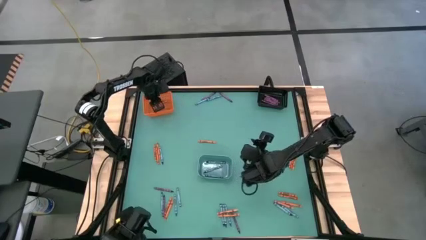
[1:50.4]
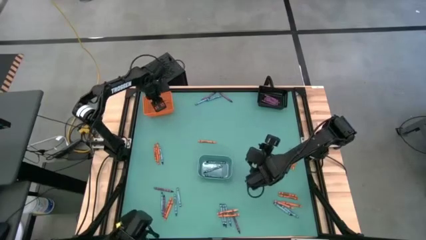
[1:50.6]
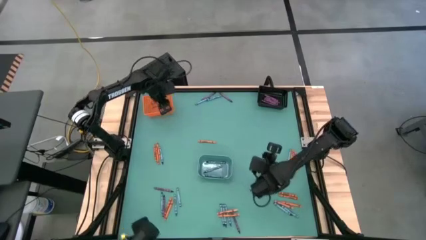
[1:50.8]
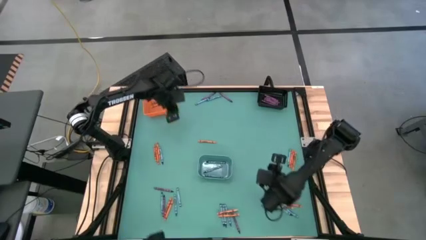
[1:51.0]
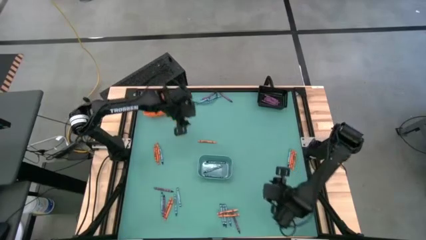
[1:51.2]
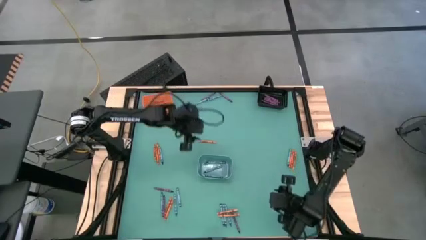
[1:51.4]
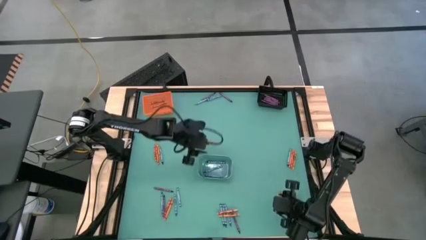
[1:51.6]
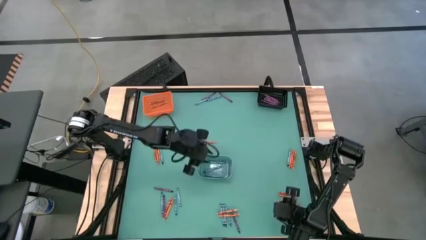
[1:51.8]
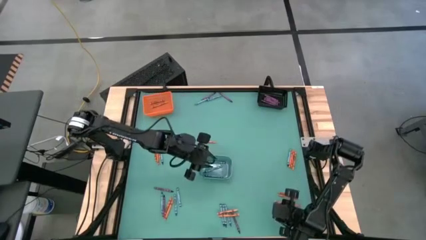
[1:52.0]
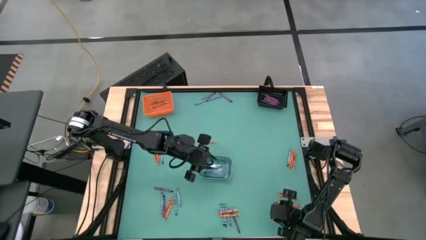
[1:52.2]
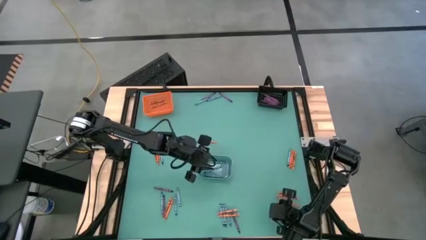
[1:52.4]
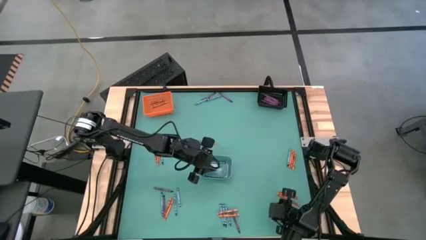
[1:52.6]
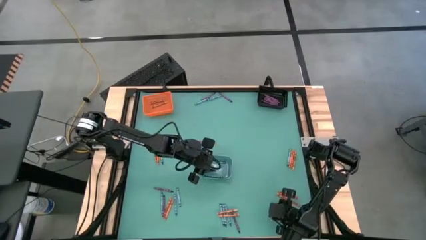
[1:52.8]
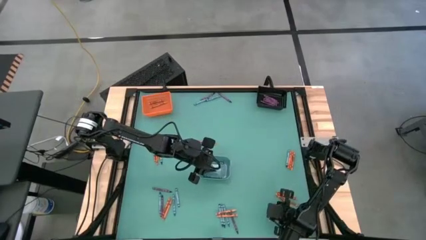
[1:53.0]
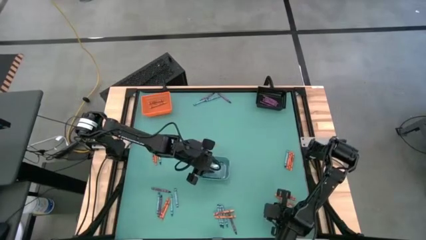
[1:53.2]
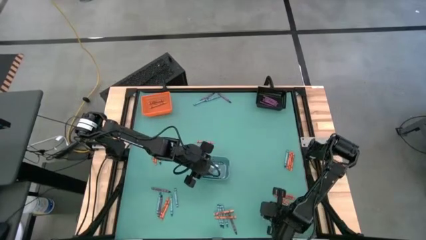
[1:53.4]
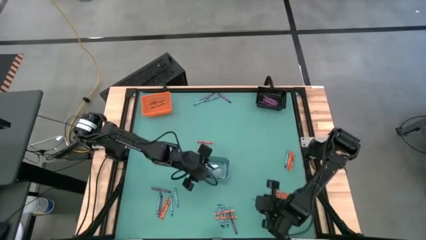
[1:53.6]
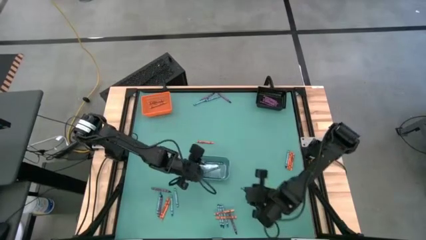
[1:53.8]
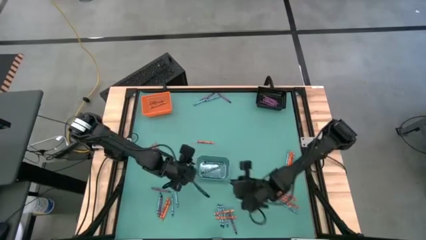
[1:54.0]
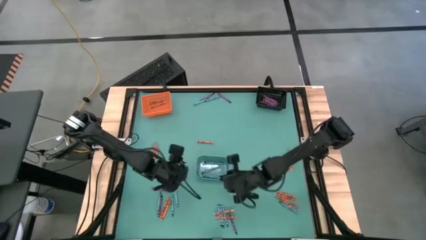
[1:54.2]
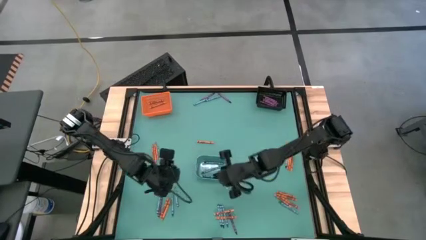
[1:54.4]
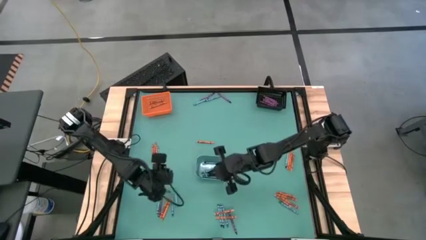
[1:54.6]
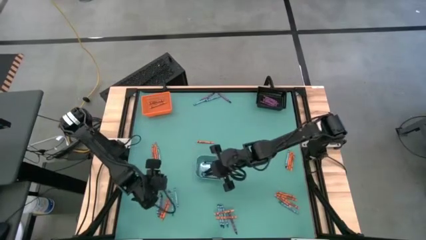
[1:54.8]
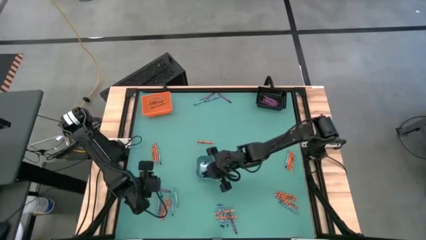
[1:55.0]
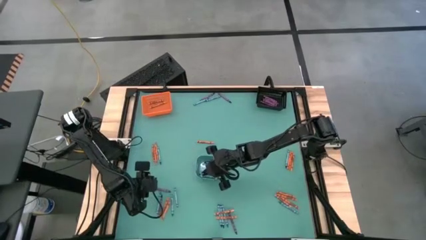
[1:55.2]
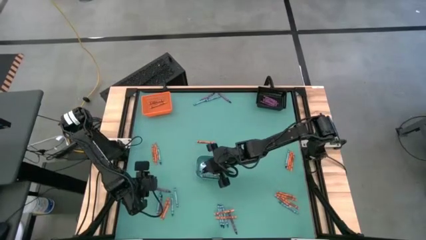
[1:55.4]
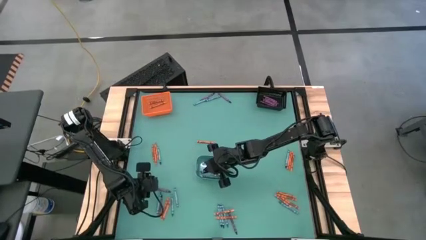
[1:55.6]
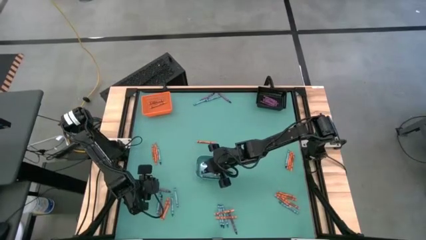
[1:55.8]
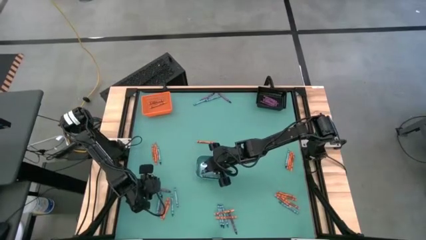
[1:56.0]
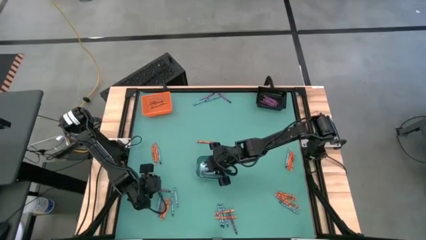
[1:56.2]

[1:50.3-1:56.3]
Task: Sort crayons
Put the blue crayon into the blue bin

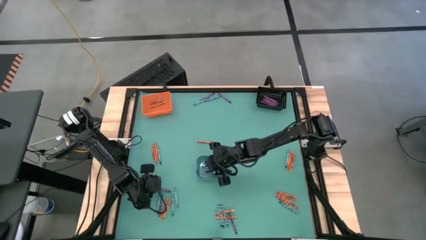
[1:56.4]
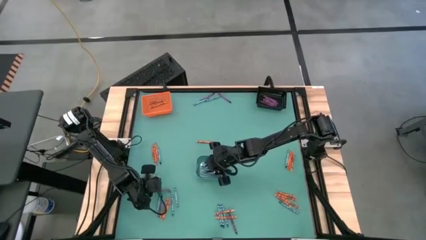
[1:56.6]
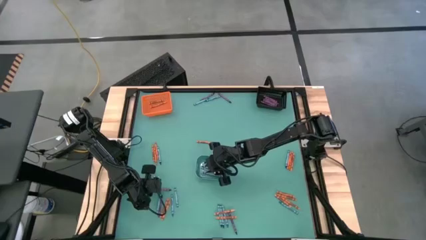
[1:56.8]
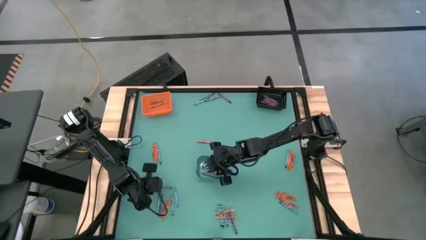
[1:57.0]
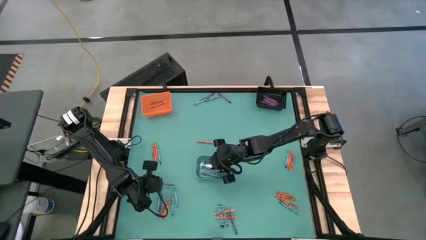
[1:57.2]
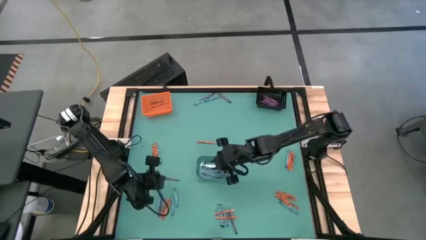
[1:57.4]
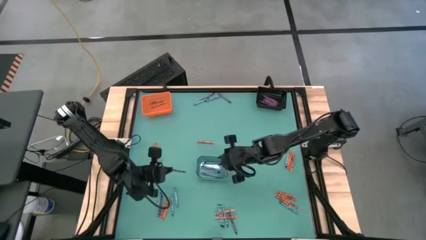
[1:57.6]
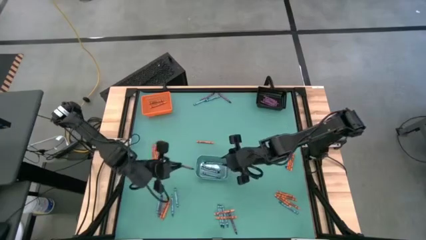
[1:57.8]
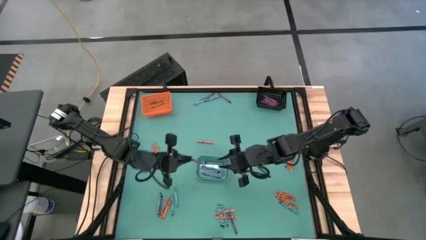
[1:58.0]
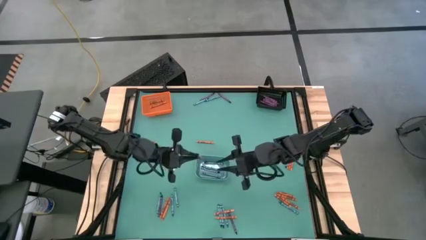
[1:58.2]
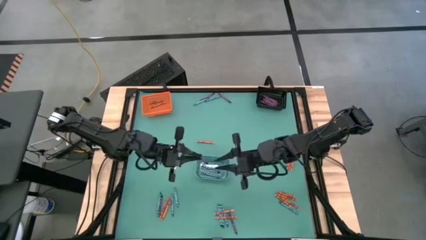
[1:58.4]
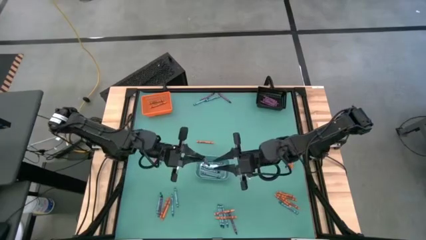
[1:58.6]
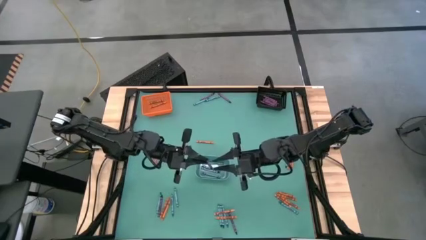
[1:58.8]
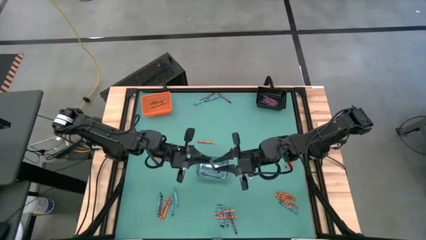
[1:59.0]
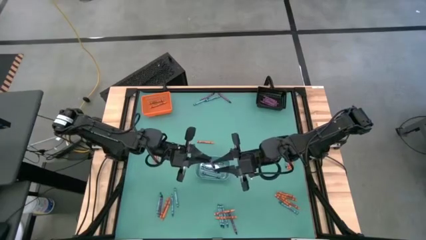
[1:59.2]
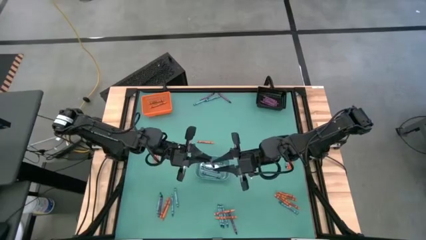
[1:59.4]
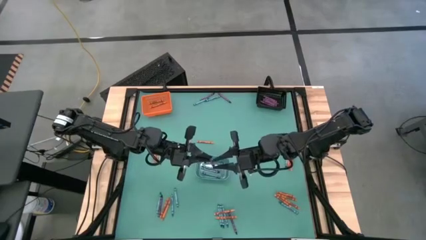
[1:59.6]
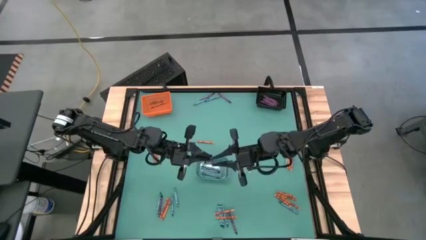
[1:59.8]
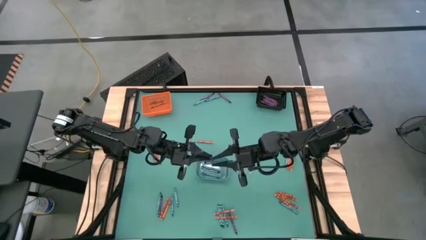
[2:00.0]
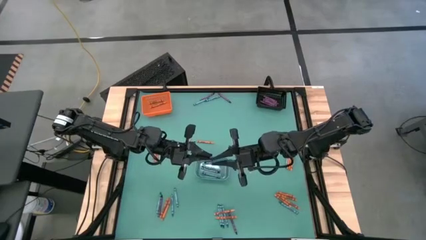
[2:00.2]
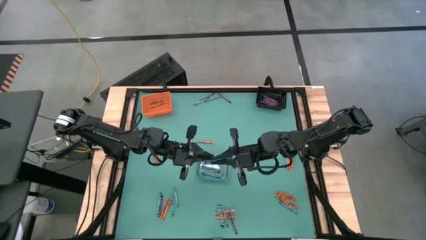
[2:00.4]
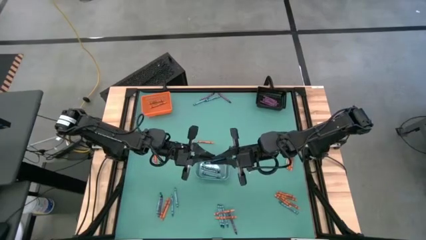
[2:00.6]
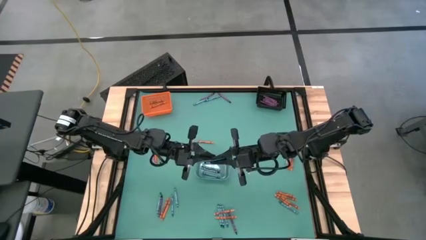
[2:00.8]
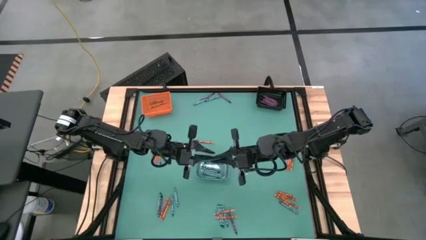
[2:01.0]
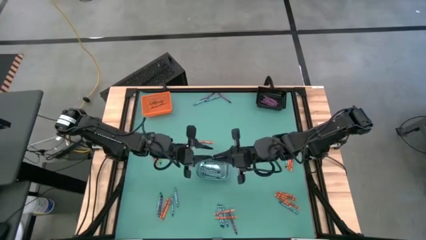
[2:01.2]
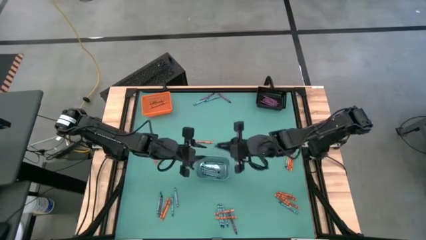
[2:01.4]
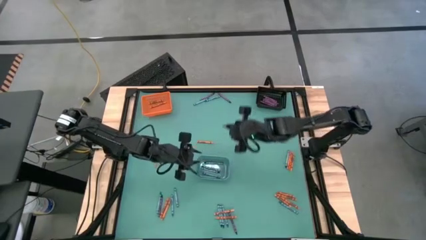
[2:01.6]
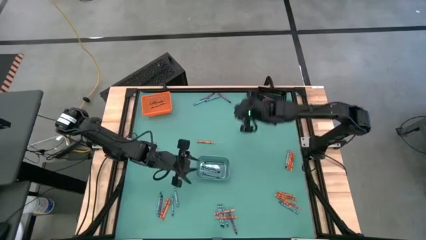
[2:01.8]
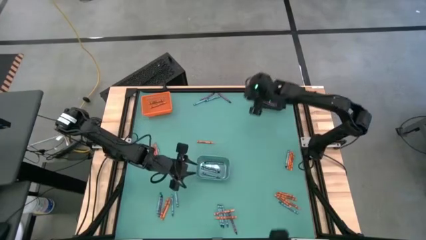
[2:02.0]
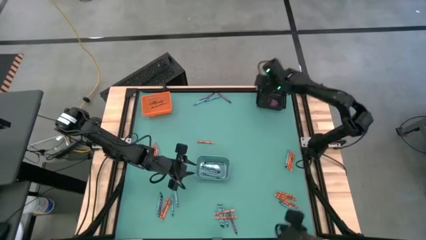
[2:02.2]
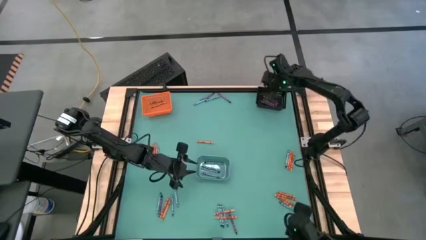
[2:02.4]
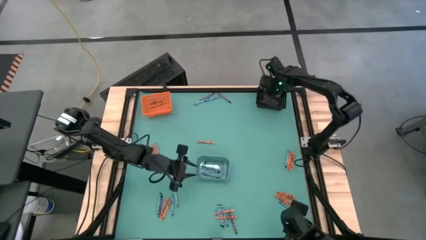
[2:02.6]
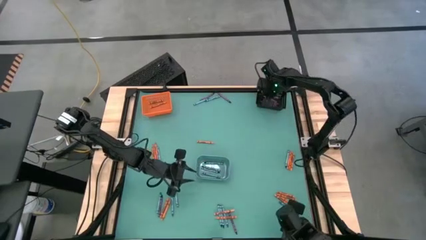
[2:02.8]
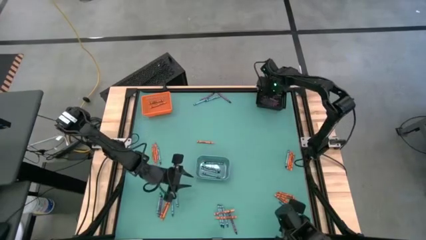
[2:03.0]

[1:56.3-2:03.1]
Put the violet crayon into the black bin

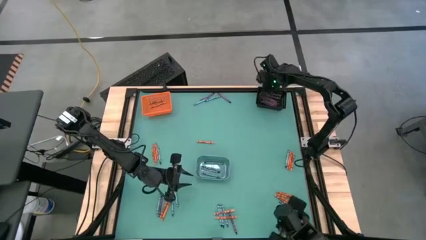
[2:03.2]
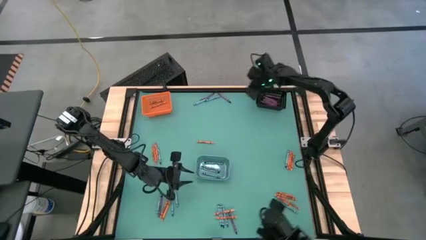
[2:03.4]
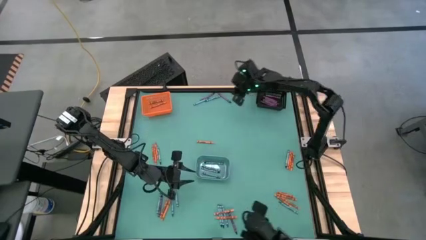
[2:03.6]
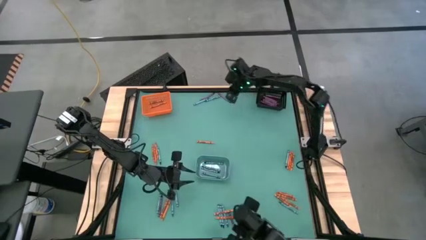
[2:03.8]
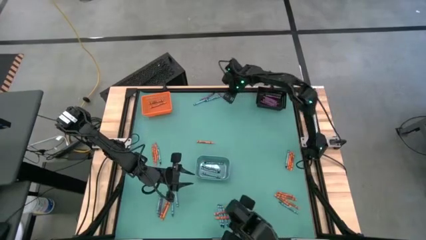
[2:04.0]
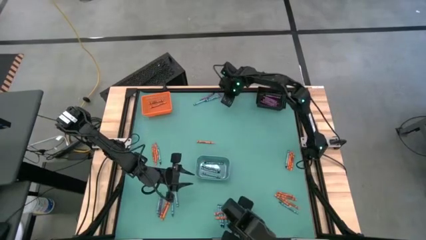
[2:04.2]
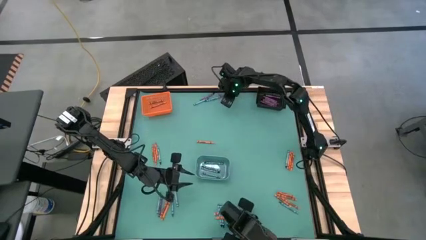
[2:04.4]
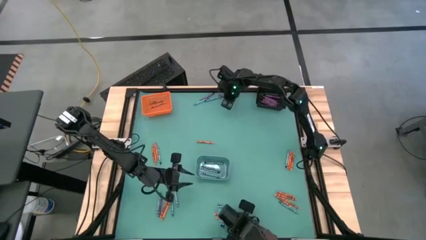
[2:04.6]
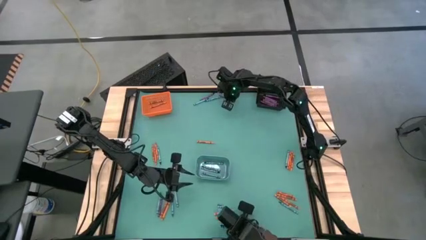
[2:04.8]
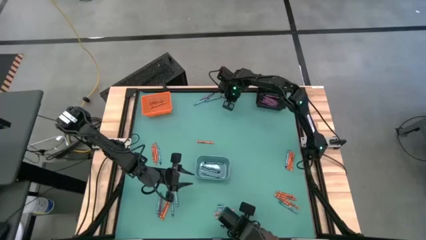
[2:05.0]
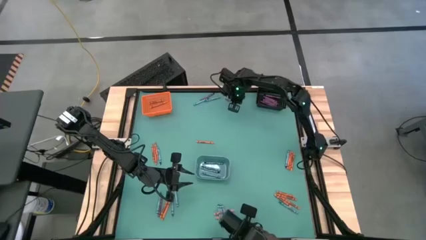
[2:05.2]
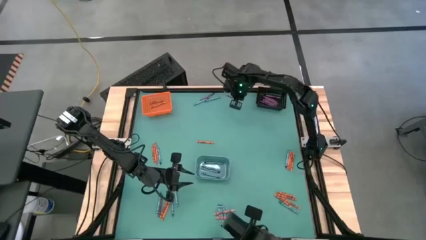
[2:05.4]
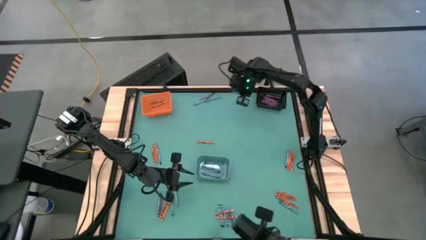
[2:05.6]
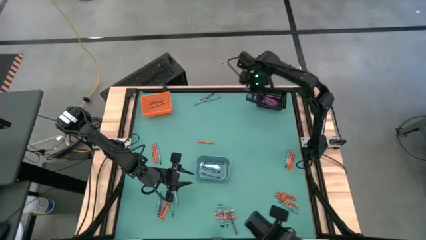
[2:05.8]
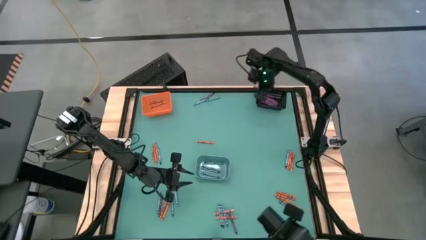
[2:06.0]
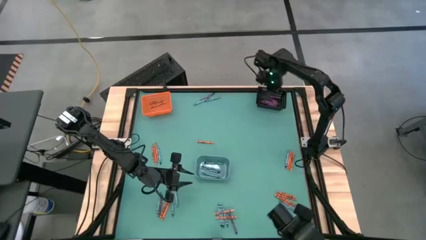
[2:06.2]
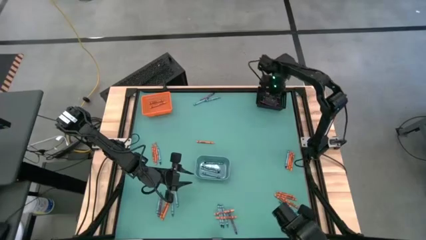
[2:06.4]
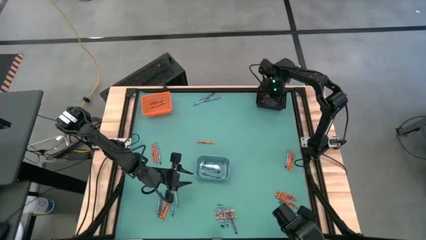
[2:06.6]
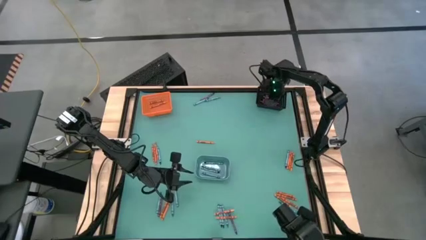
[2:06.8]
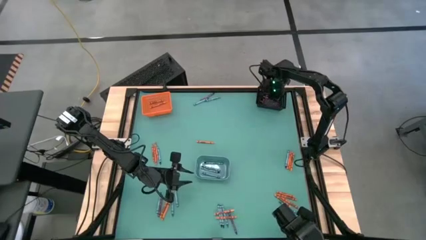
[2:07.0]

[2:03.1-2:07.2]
Put the violet crayon into the black bin

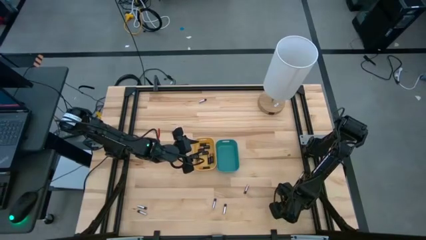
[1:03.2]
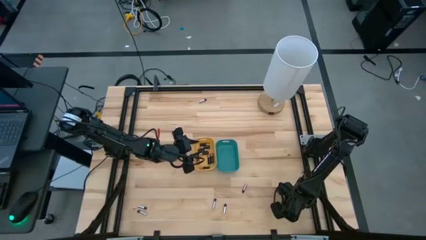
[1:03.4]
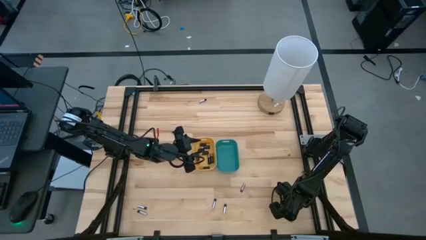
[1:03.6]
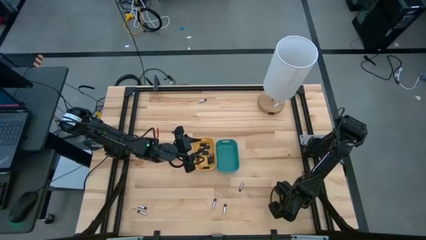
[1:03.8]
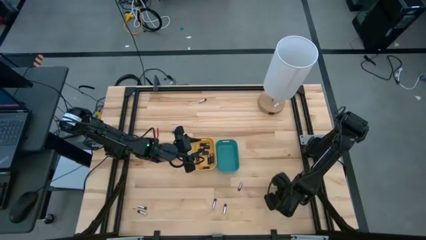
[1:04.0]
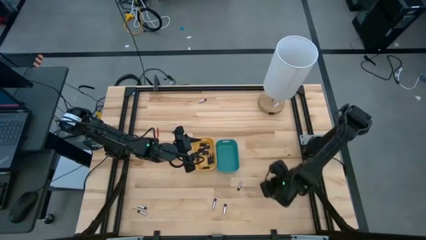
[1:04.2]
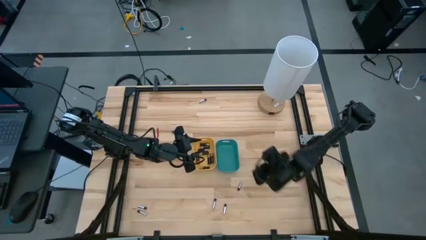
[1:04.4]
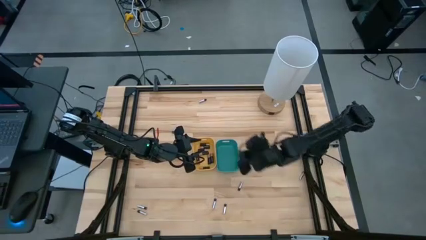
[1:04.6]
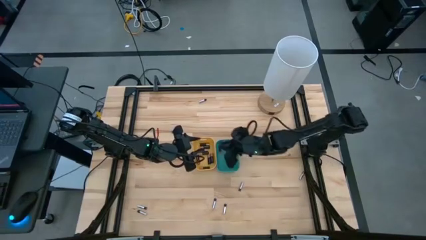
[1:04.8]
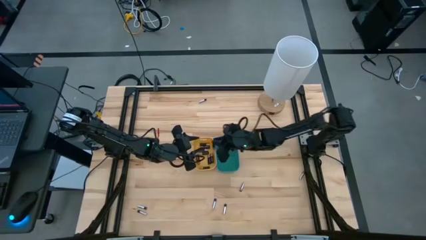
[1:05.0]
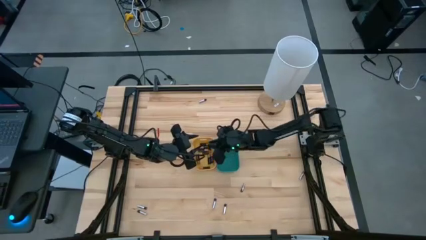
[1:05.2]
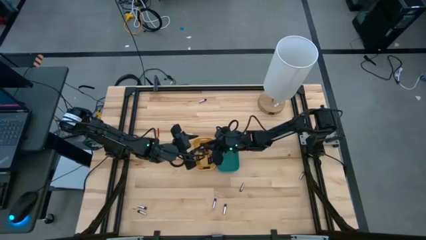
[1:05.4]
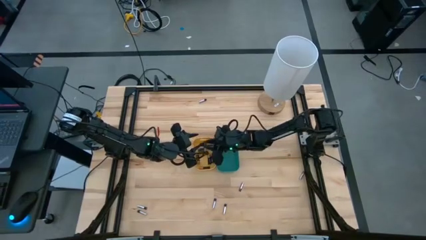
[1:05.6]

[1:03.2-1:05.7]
Task: Sort batteries
Put the black battery into the yellow bin
